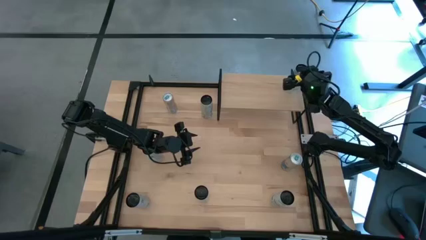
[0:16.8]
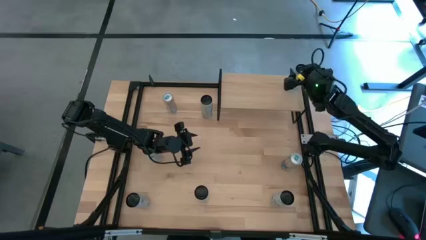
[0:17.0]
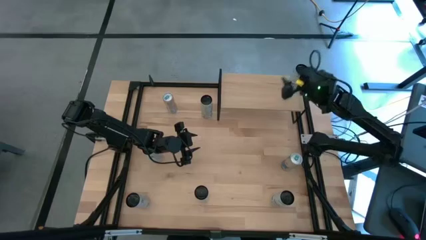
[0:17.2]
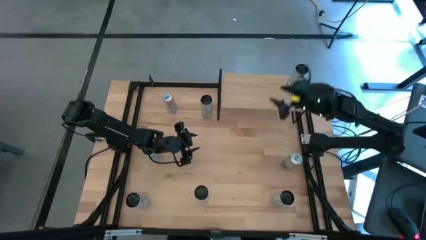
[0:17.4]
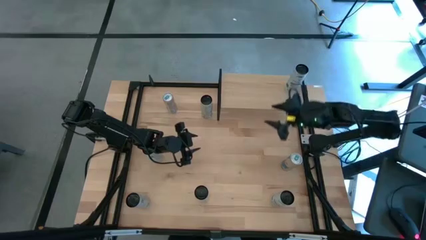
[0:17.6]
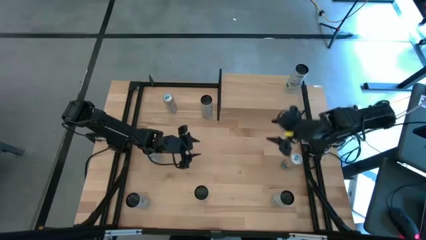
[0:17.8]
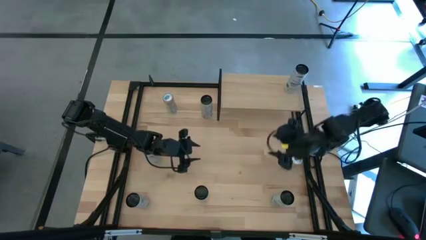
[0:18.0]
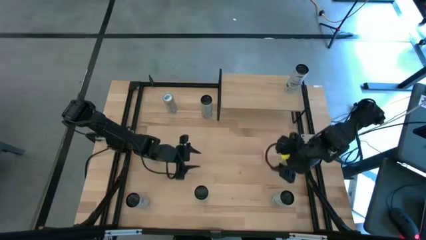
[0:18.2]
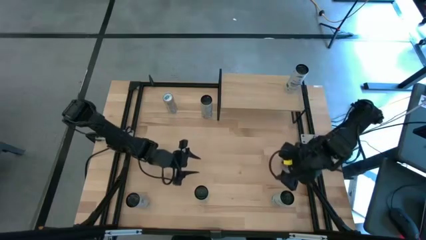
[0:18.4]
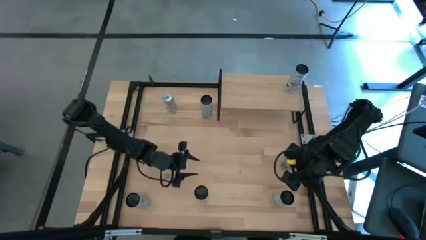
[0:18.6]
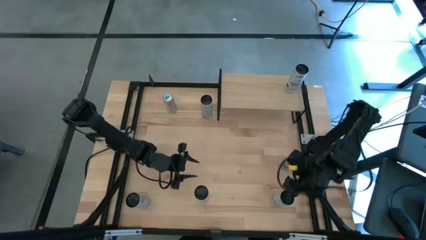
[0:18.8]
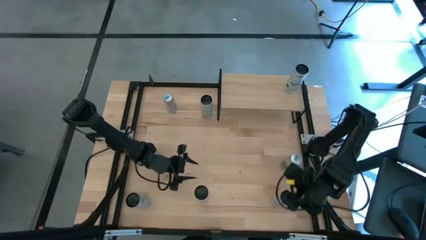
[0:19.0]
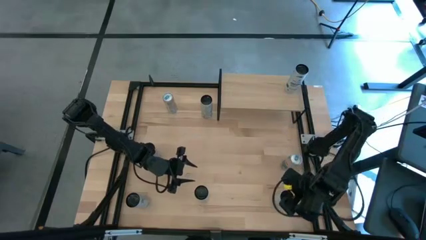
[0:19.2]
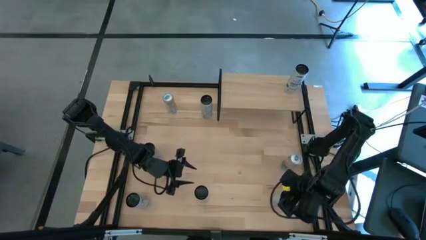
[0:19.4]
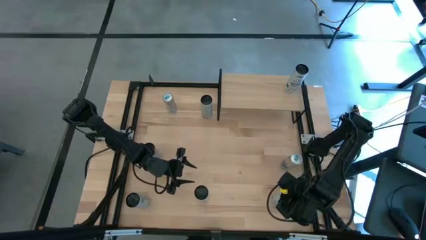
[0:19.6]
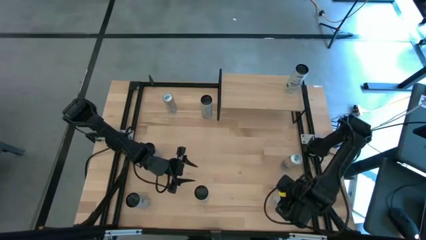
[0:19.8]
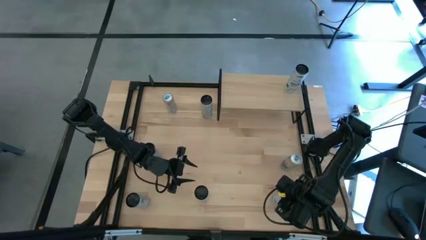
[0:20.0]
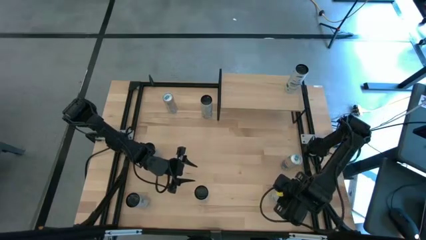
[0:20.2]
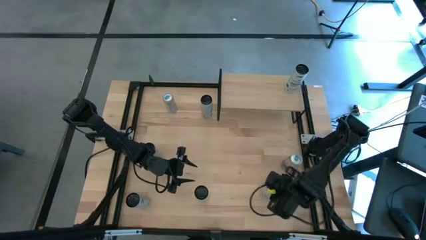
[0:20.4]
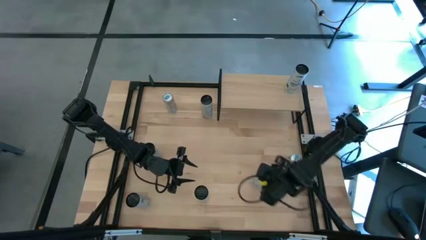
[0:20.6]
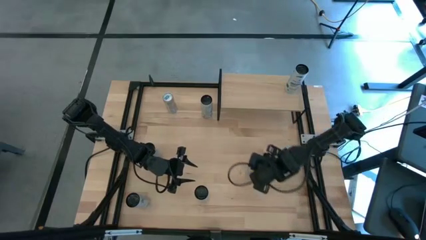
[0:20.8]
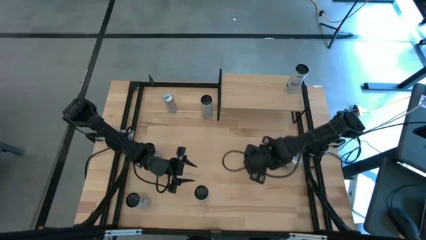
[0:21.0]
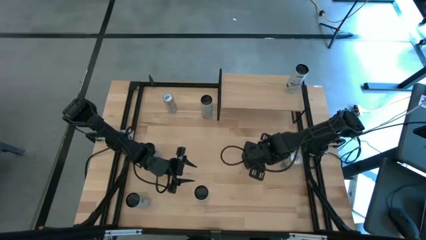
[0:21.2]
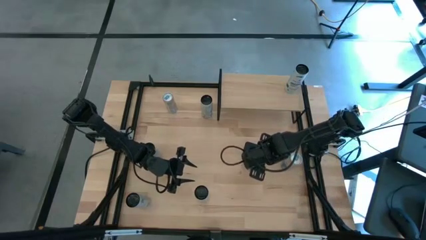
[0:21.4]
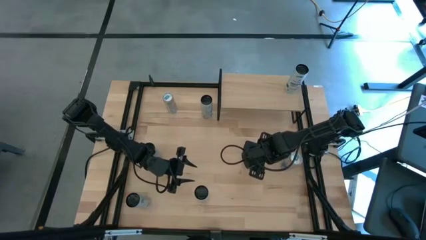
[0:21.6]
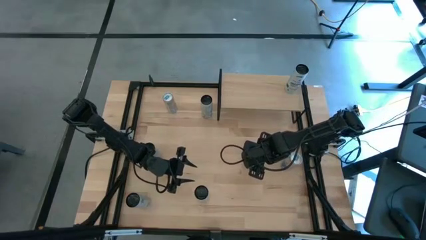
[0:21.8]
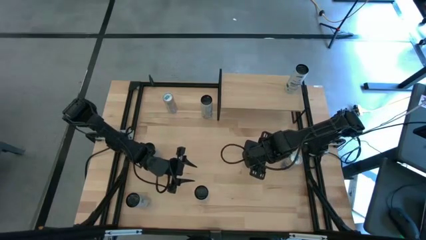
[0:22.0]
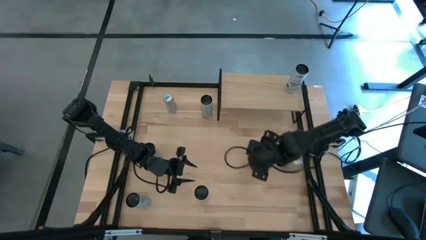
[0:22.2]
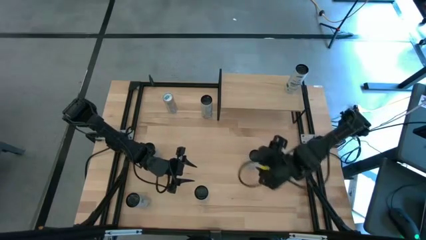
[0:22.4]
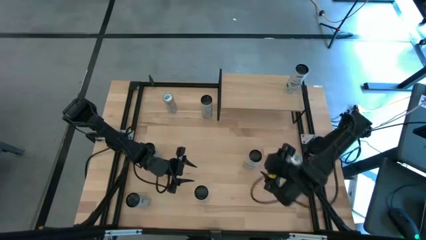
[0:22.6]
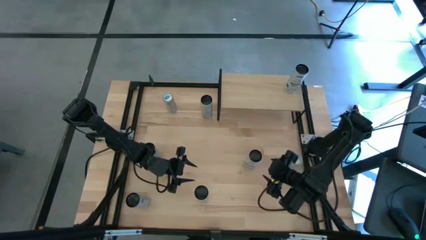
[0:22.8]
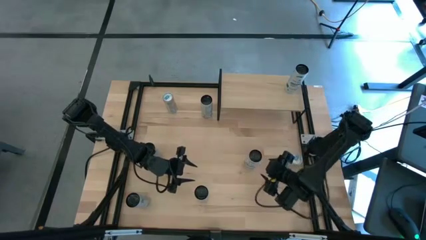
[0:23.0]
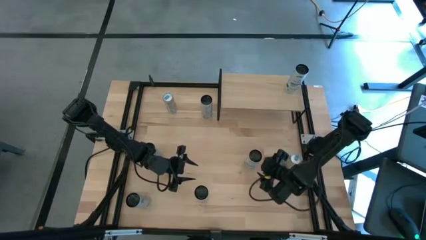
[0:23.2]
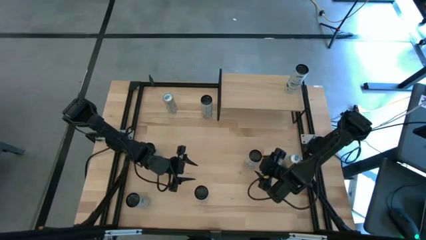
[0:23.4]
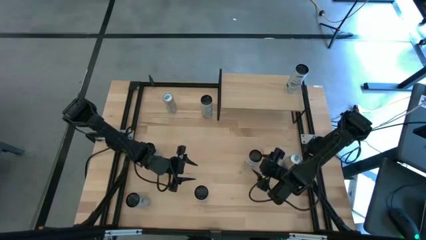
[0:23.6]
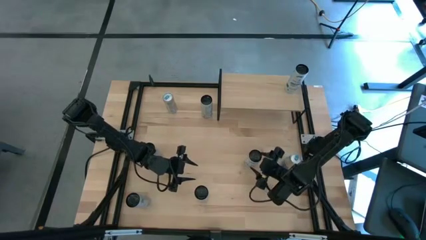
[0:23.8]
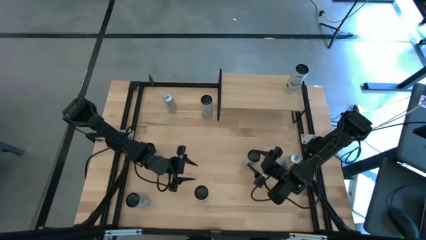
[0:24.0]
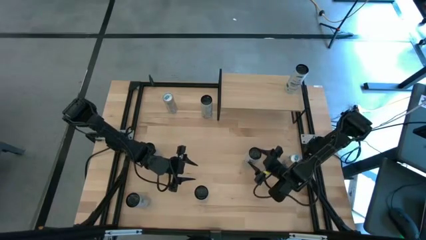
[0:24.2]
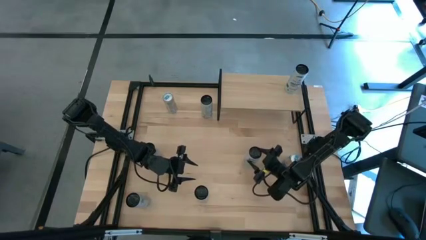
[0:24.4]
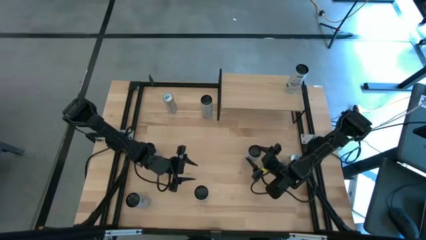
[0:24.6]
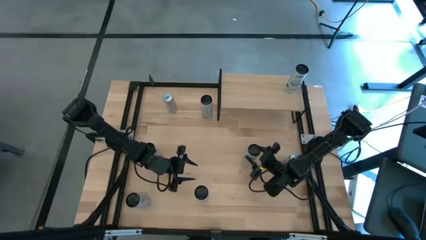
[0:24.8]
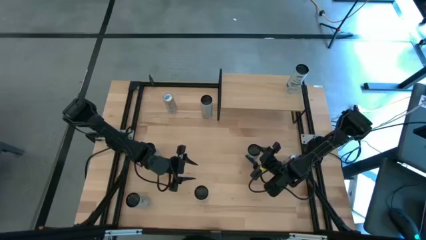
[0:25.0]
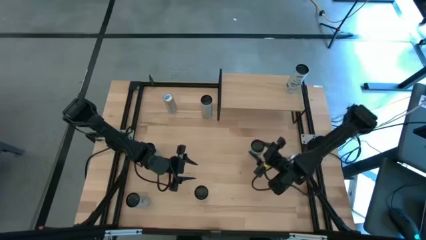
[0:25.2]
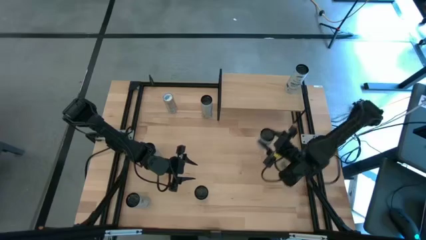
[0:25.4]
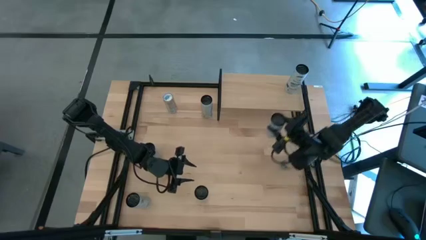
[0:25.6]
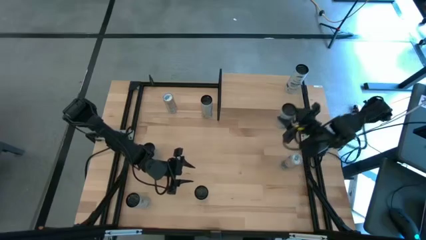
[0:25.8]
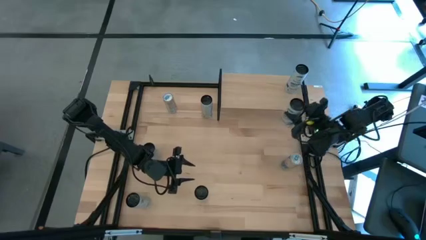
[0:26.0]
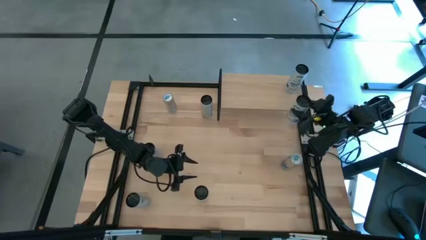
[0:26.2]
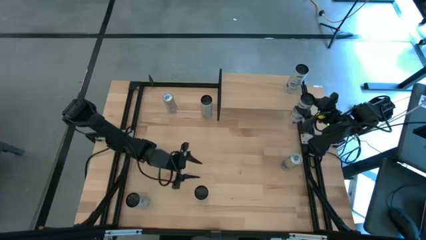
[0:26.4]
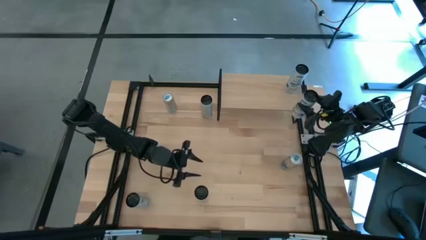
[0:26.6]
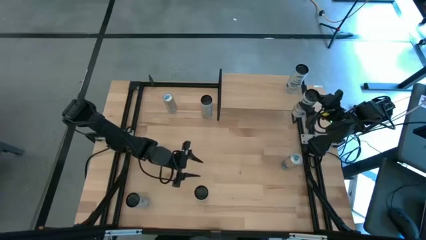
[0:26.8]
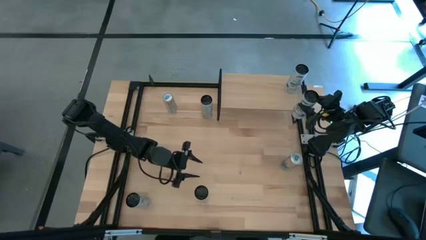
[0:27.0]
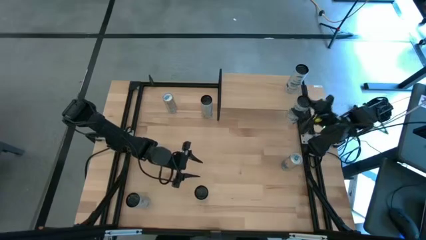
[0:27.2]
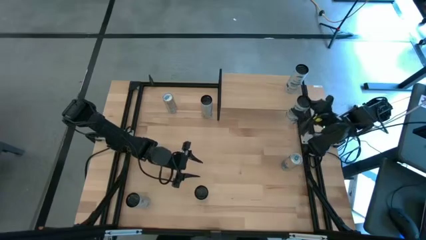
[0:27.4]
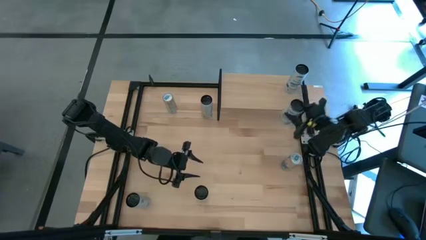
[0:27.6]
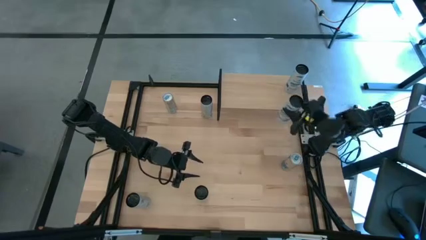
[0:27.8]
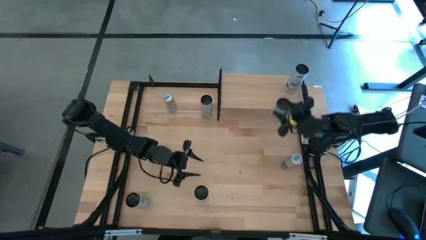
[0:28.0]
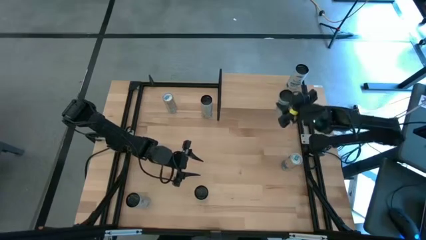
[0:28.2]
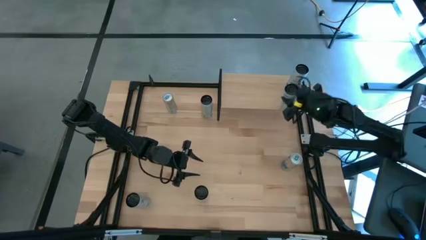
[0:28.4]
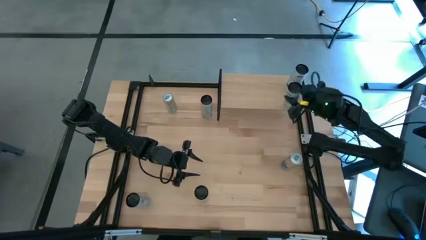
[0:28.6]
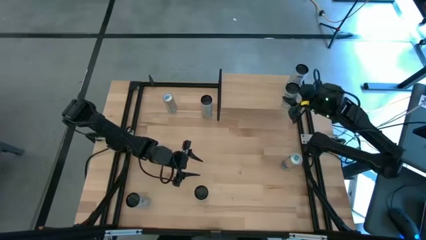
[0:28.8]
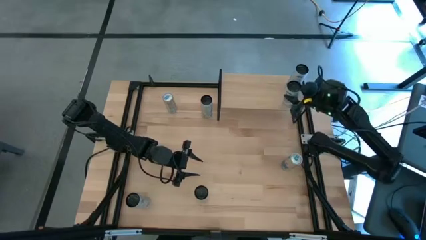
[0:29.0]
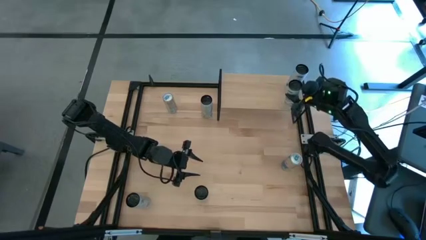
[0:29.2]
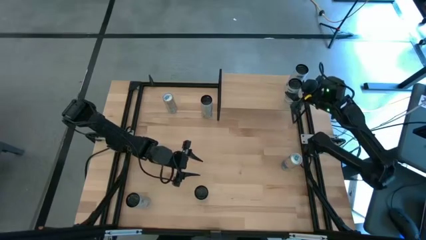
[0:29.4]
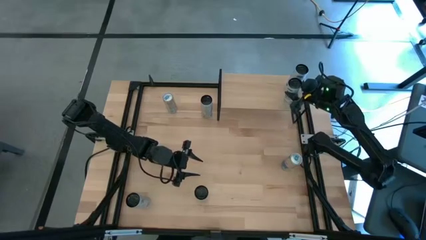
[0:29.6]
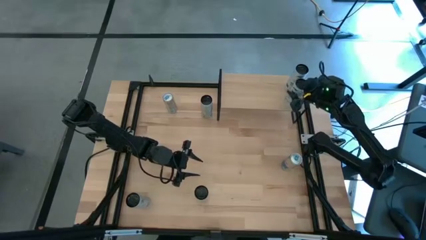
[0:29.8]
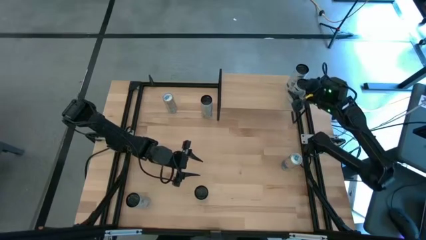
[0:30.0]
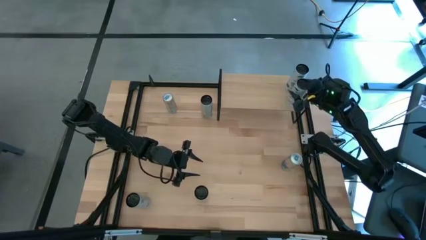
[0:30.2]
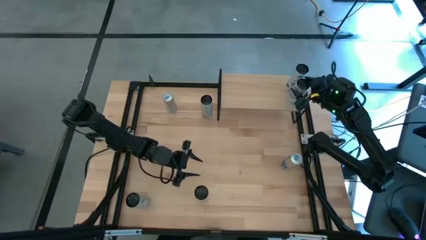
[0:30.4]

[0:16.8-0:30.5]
Task: Place canned beverage on shelf
Put the white and blue soda can on the shelf aligned with the other white and blue soda can
